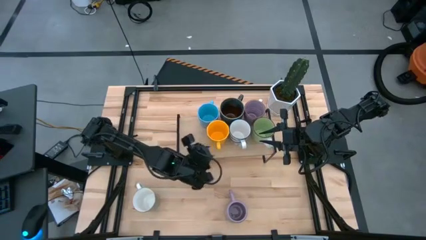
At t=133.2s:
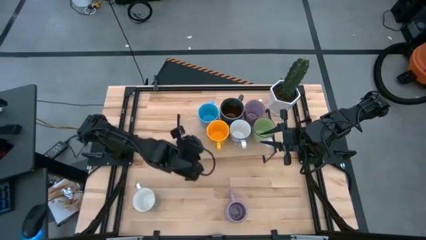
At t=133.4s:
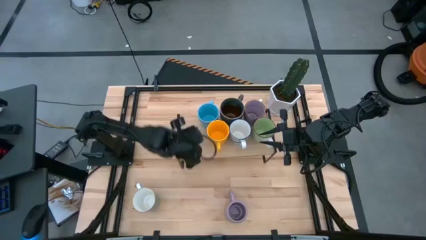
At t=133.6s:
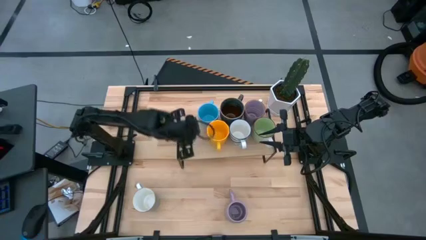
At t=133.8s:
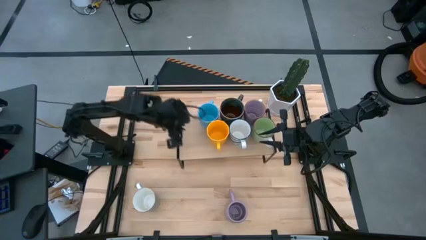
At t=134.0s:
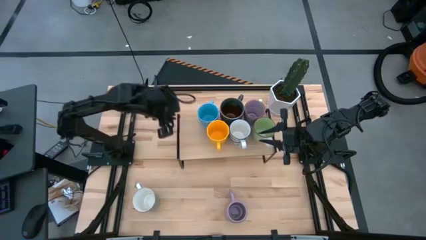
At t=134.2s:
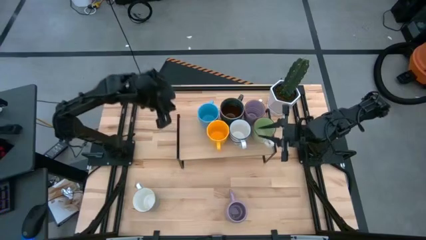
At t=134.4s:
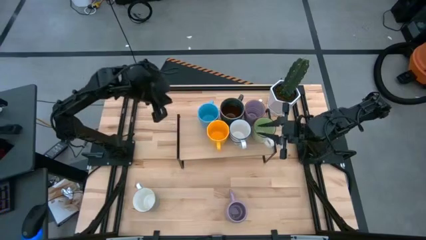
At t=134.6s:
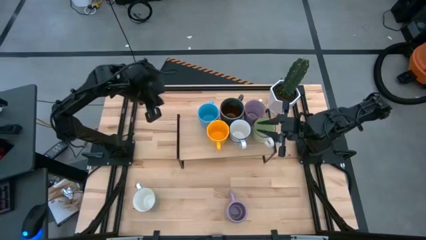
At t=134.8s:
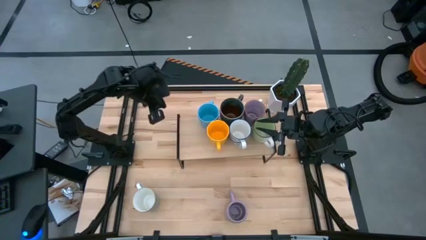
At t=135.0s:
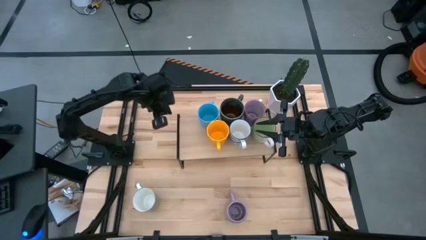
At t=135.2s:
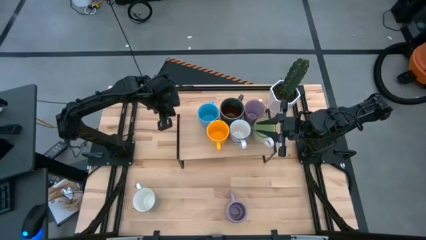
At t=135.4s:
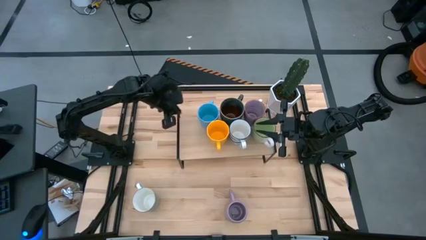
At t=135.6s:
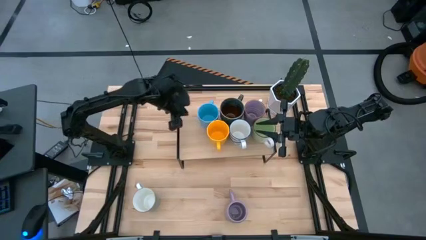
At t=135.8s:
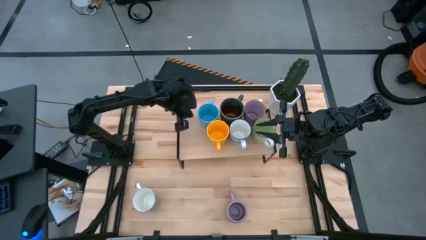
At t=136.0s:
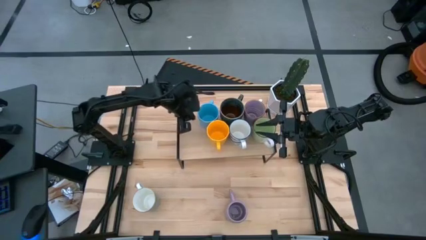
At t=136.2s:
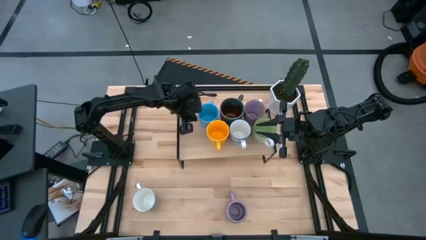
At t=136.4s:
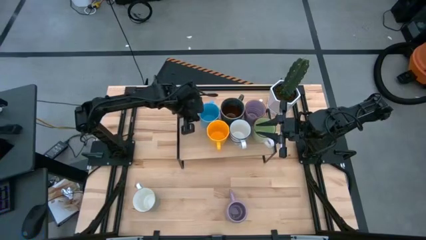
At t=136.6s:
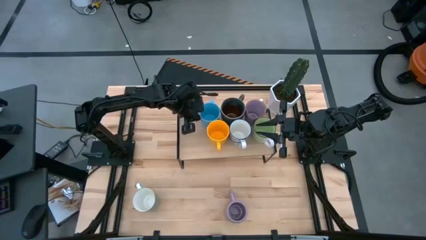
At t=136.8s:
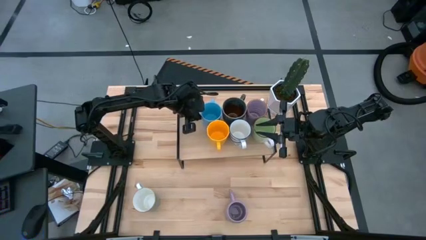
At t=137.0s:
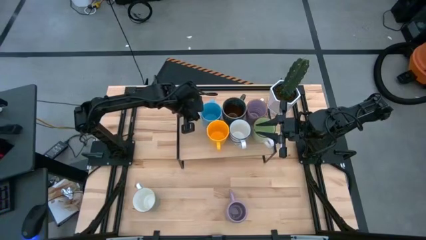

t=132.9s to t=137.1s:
Task: Place coffee mugs
Adjust the blue mug on the shelf

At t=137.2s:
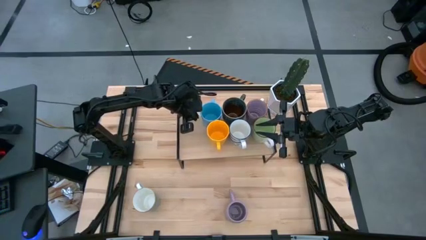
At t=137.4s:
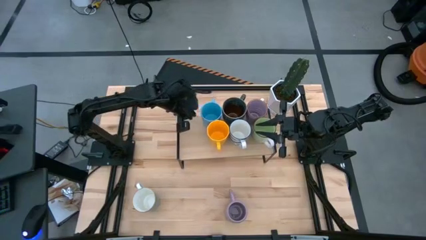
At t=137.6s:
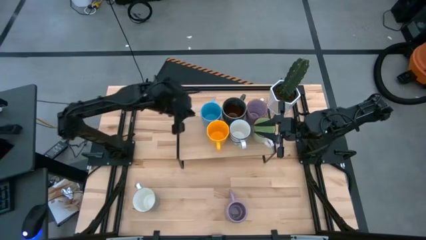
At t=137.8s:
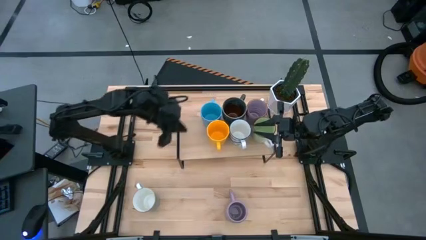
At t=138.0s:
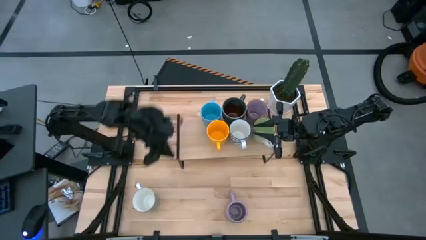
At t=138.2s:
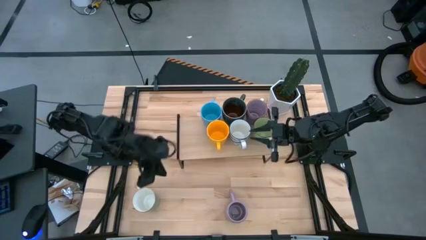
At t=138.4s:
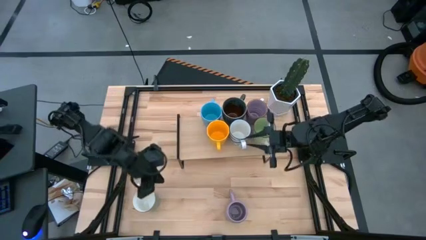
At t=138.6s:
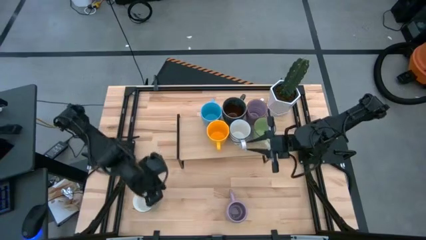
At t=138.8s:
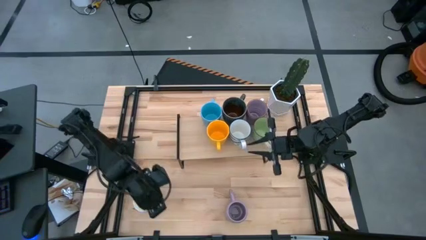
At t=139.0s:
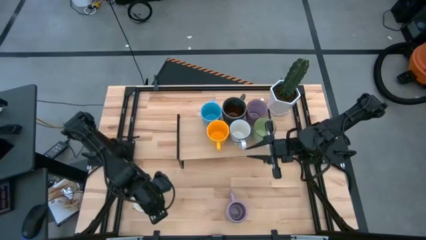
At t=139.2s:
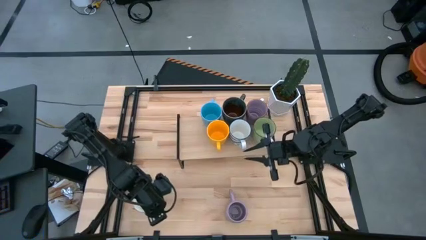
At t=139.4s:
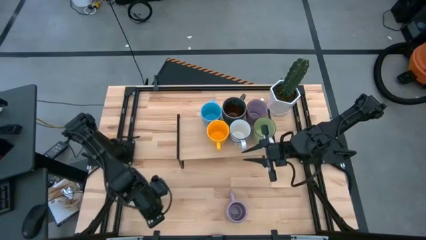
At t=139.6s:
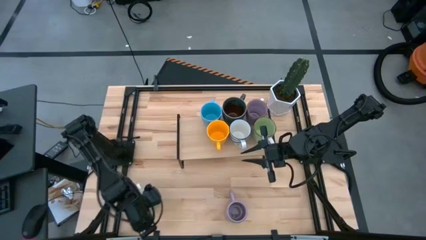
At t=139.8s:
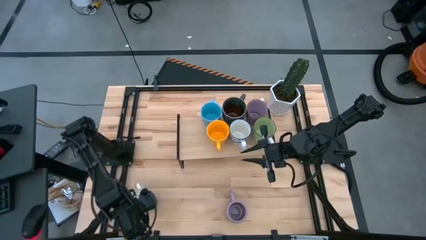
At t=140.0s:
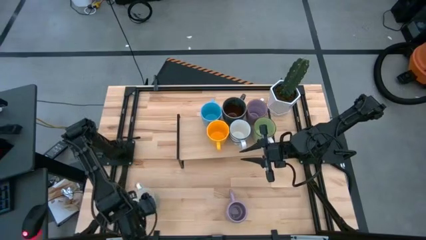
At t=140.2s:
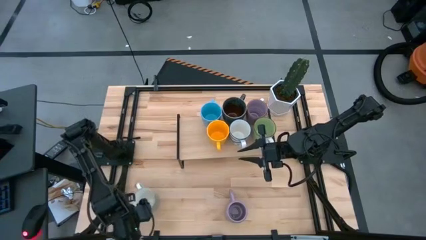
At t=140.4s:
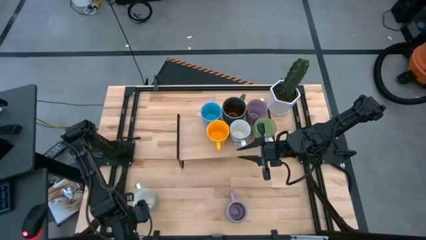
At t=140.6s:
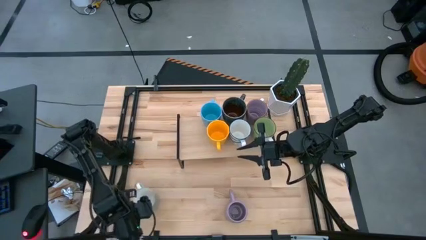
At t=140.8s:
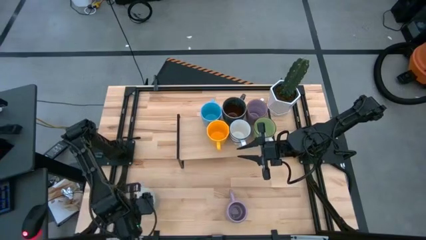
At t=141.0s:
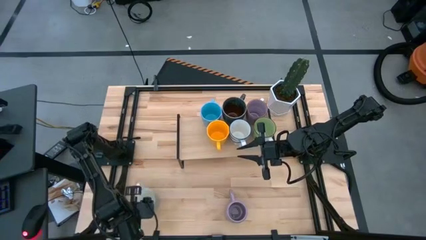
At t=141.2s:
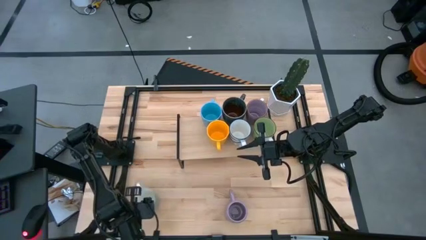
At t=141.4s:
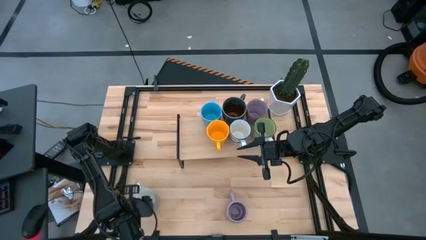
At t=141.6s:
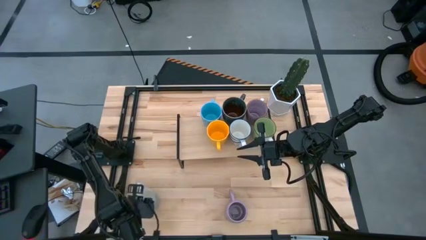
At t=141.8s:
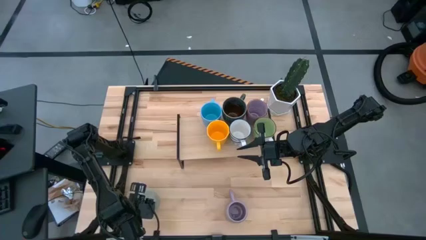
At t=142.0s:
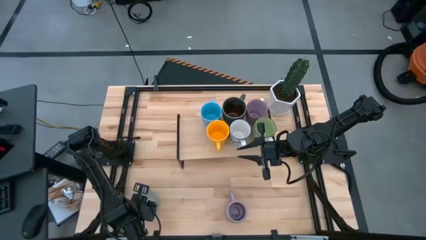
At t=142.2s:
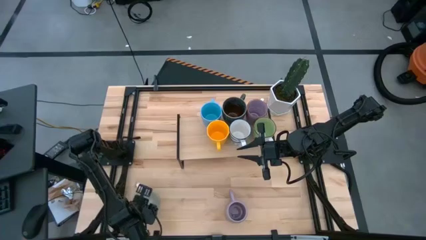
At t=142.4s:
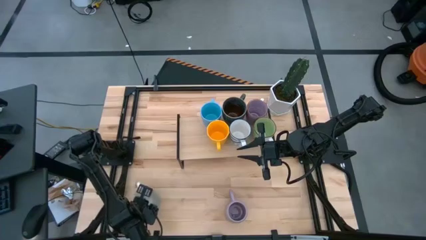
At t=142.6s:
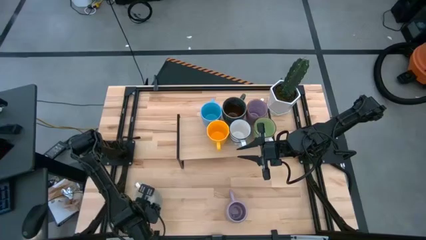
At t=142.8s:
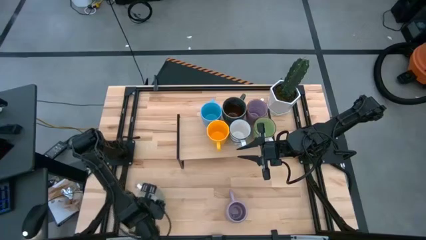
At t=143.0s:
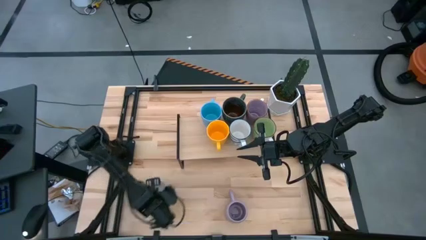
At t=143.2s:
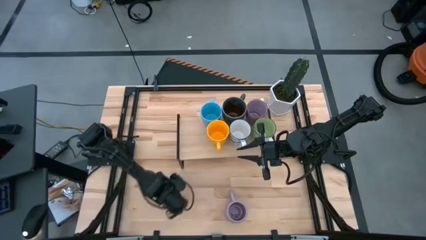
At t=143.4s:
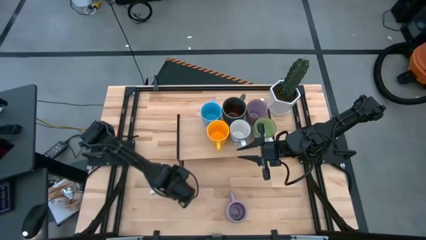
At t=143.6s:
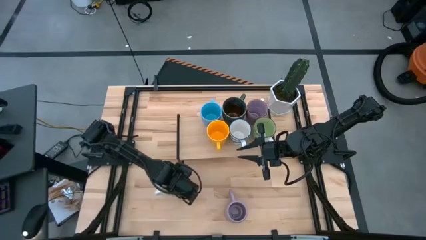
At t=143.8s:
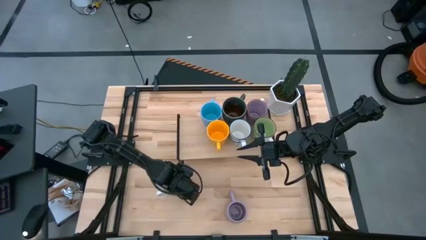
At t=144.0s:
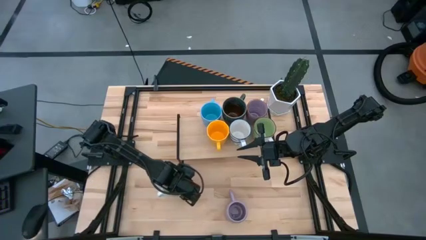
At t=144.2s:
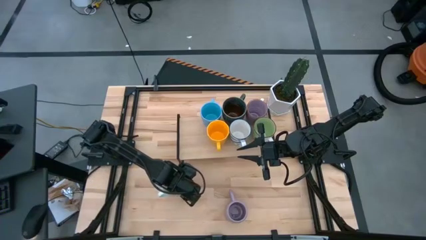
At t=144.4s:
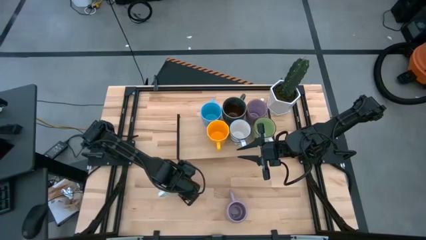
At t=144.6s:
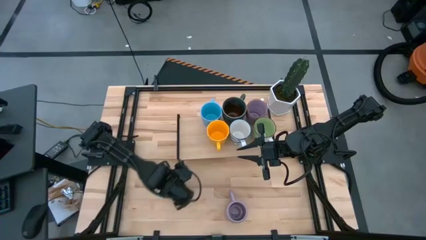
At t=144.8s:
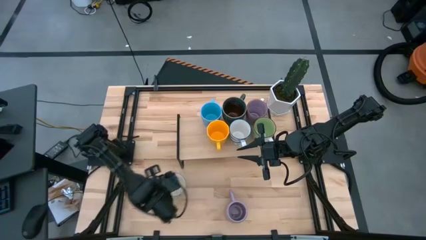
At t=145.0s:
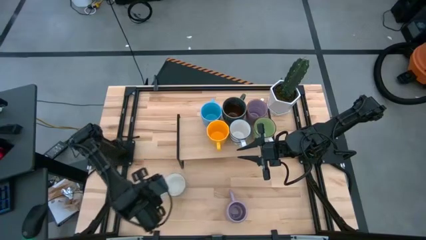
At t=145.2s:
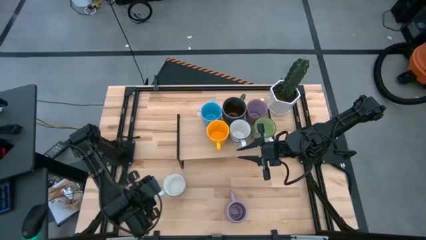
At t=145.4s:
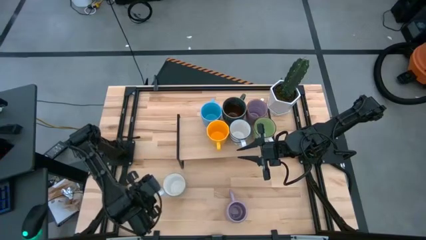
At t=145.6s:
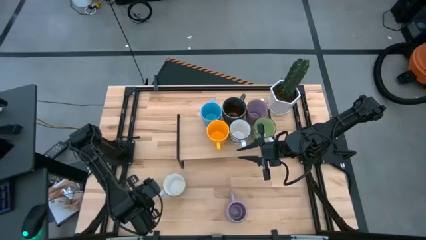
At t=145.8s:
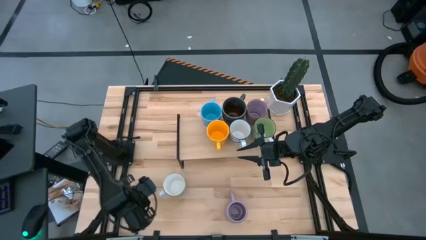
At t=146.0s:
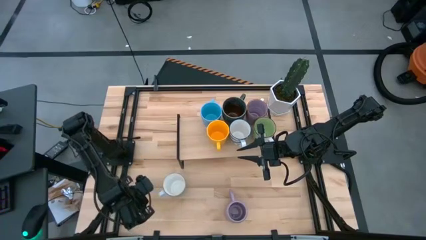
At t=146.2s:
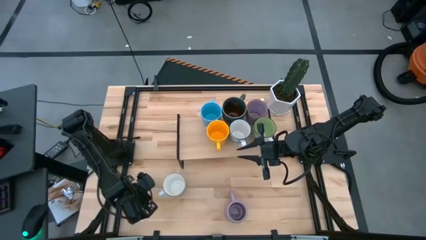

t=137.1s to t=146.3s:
Put the light blue mug on the shelf
